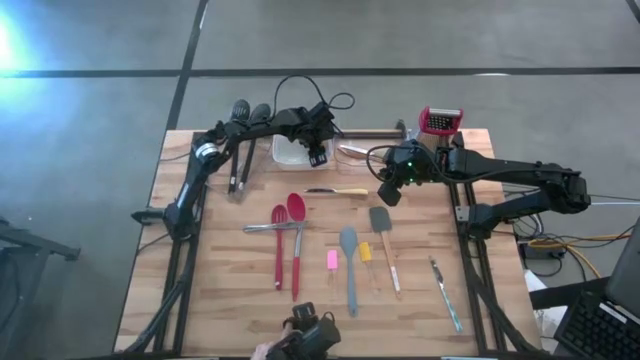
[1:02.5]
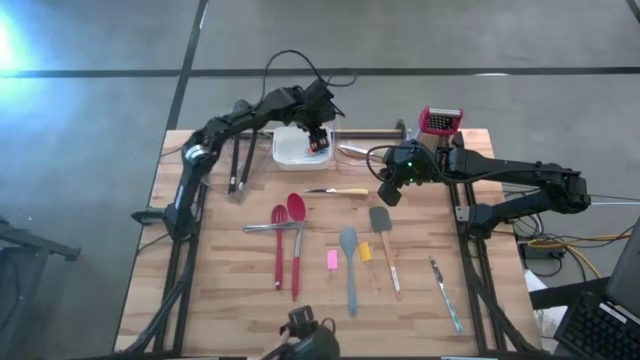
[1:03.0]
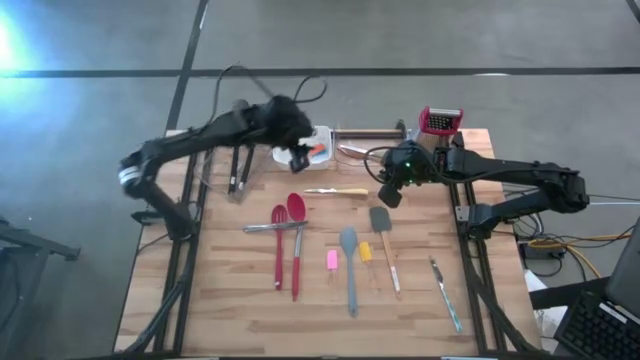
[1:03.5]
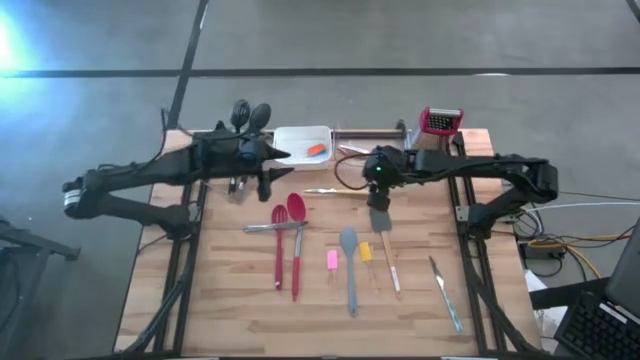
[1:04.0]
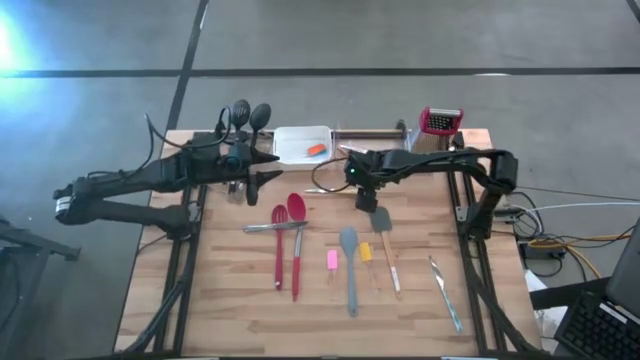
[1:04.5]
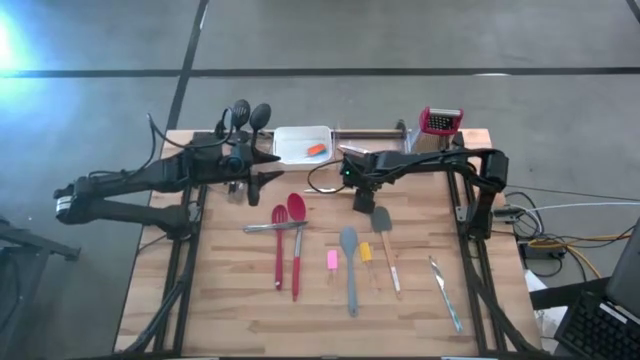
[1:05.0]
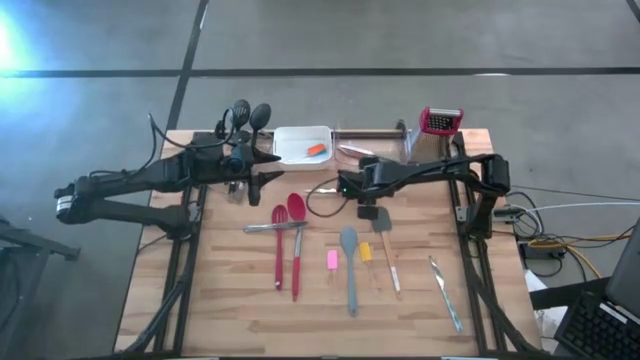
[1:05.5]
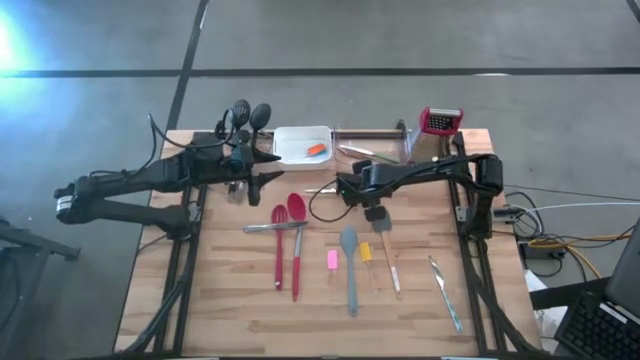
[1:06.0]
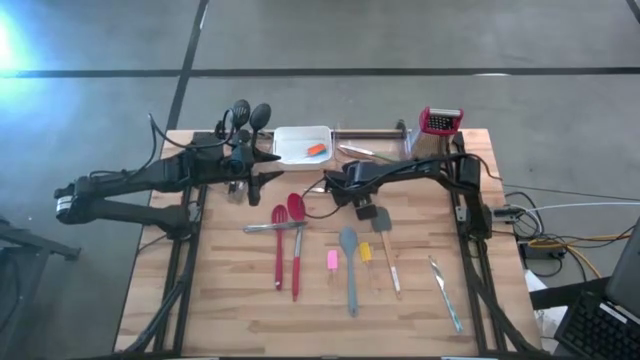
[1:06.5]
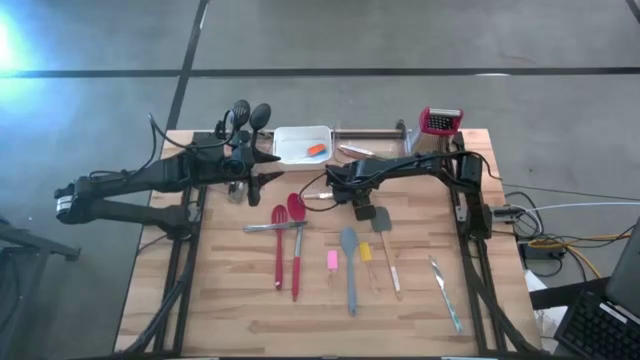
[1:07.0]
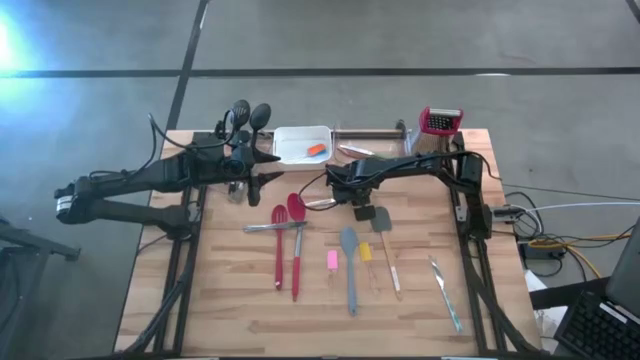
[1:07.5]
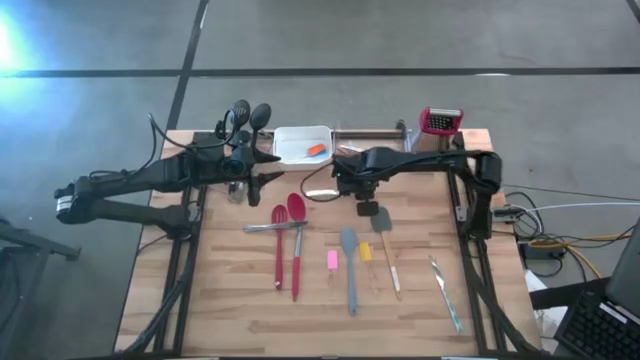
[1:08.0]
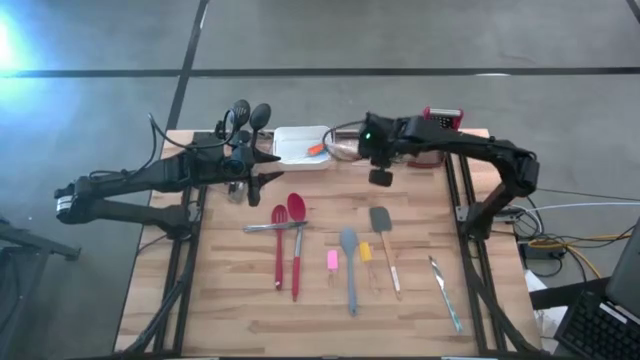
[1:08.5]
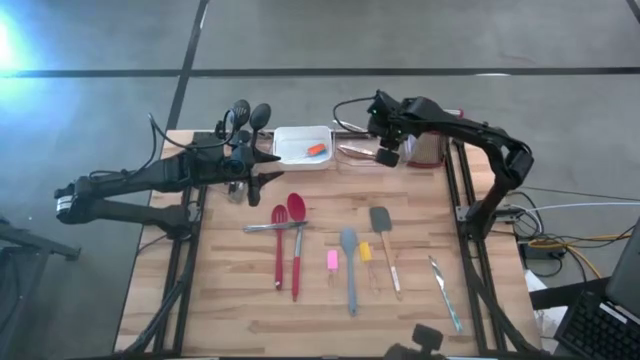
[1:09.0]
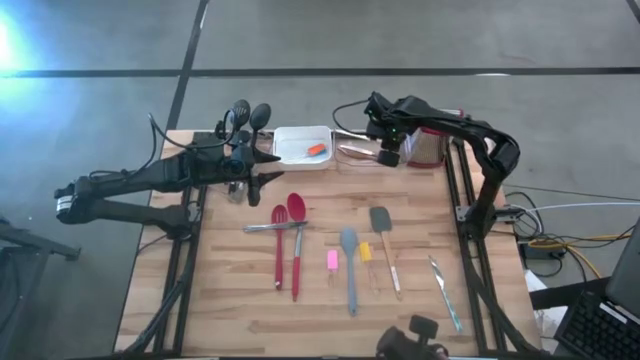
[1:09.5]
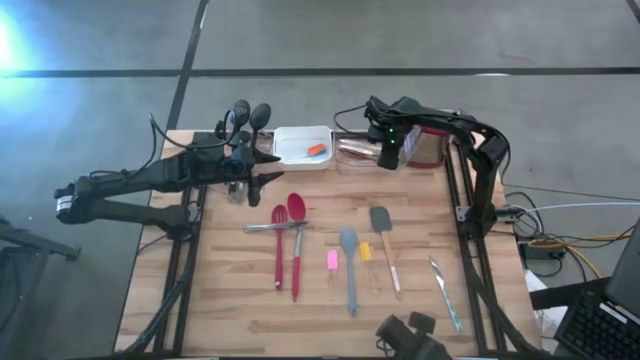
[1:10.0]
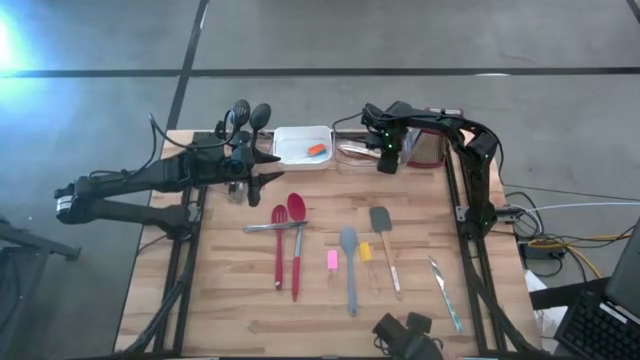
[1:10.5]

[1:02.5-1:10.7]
Task: Pick & Place Kitchen Items
Put the yellow table knife into the right transparent bin

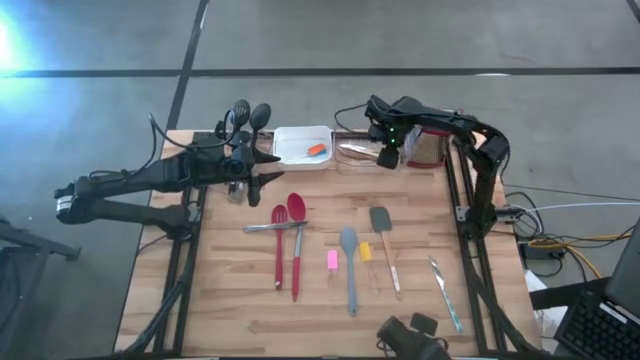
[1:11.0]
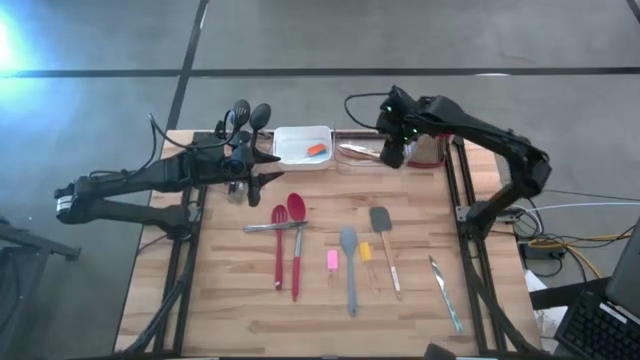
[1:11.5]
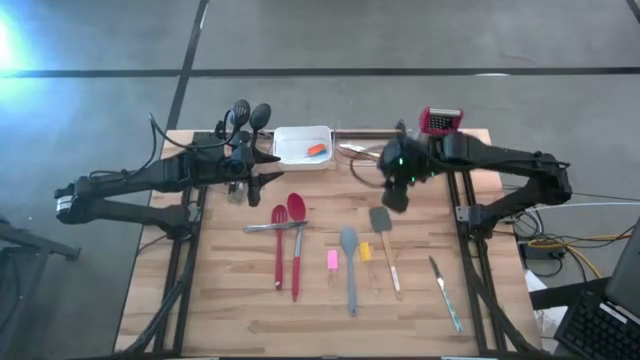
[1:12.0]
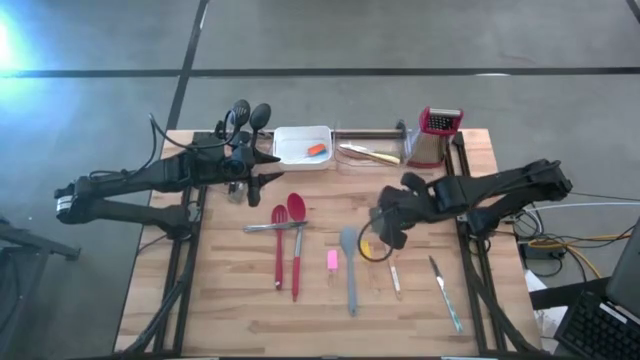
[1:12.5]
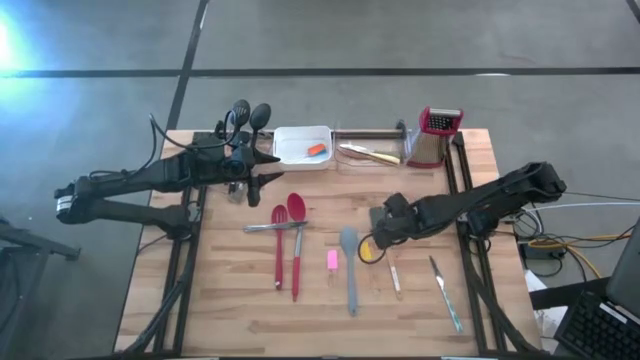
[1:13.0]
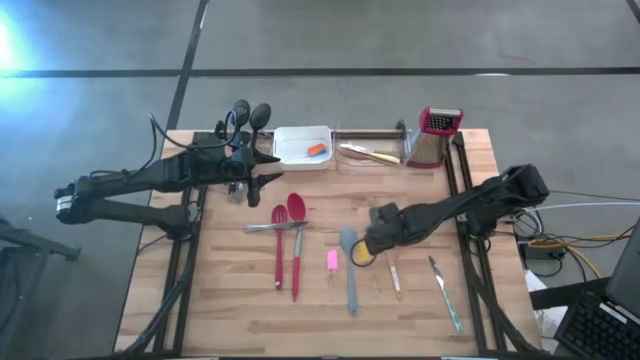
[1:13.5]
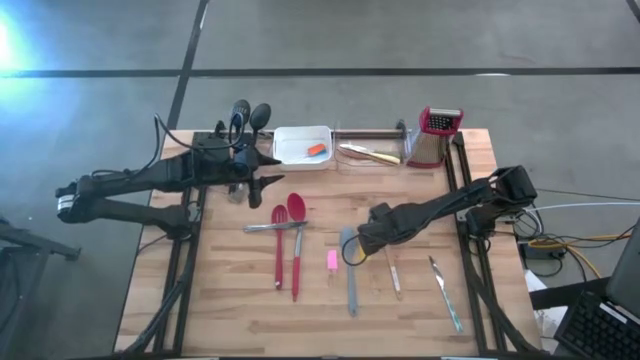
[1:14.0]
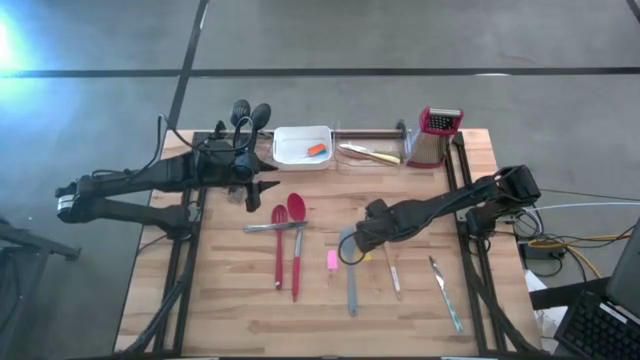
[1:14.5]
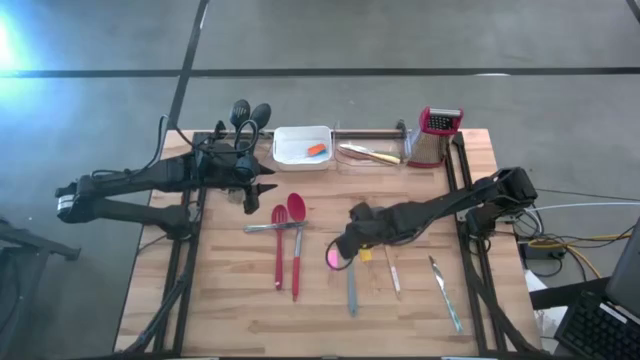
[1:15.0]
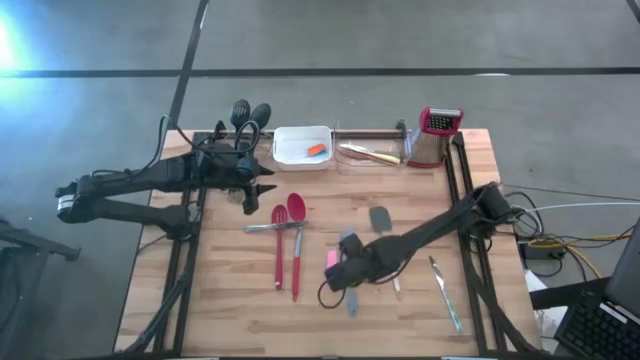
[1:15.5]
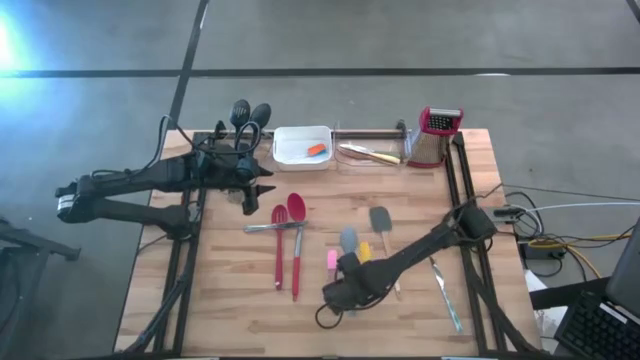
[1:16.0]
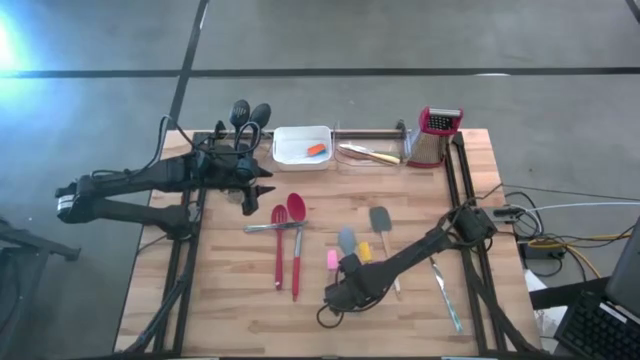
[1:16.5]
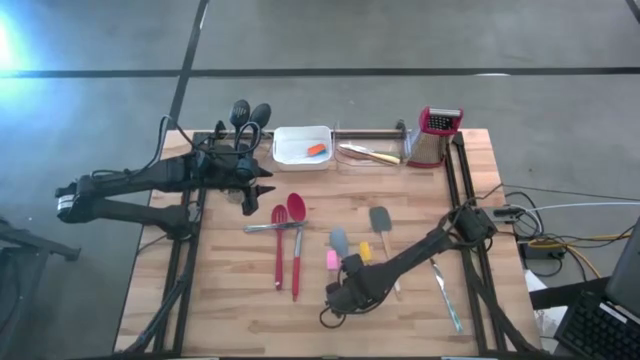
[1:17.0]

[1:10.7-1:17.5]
Put the gray serving spoon into the left transparent bin

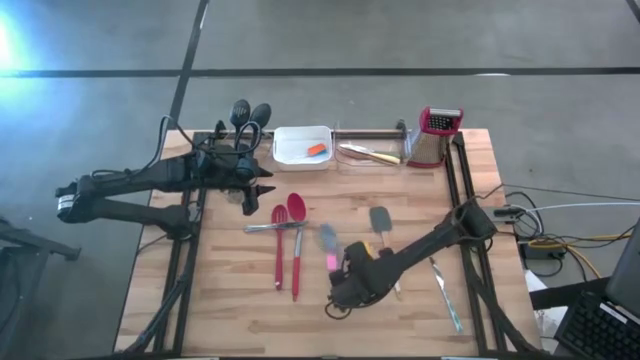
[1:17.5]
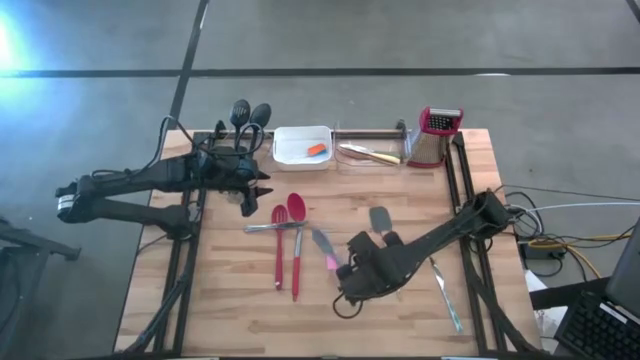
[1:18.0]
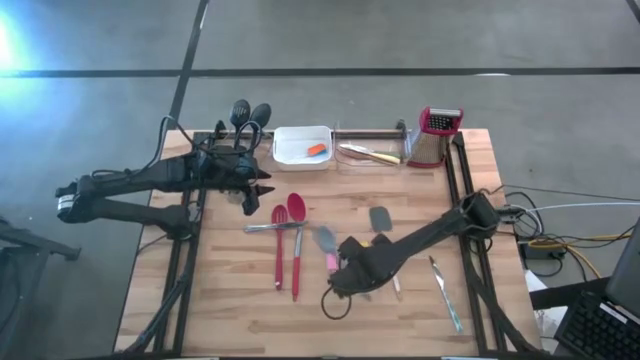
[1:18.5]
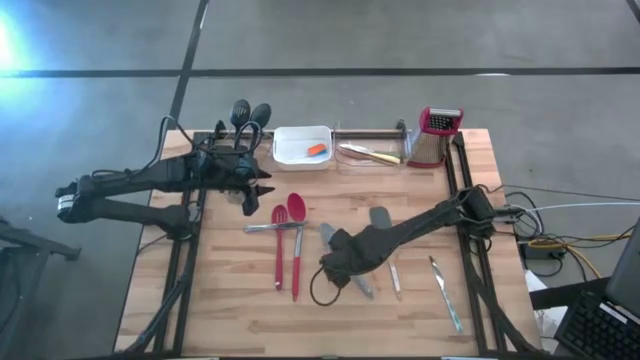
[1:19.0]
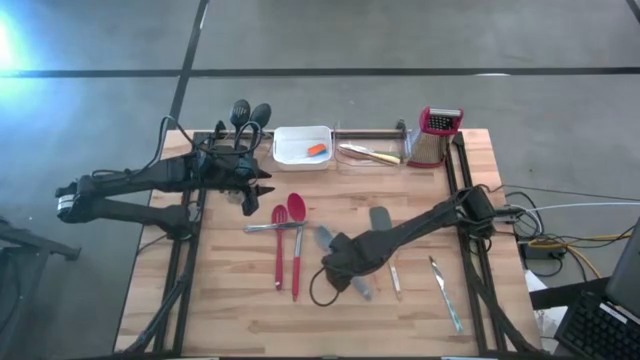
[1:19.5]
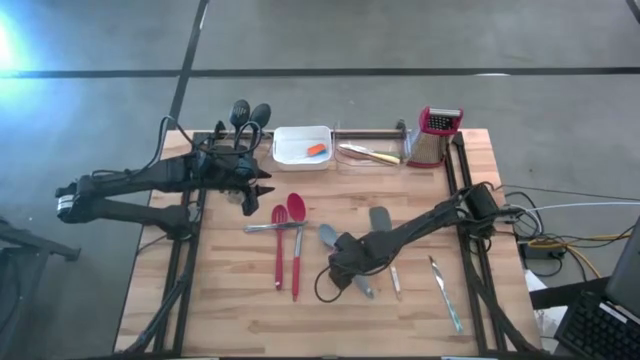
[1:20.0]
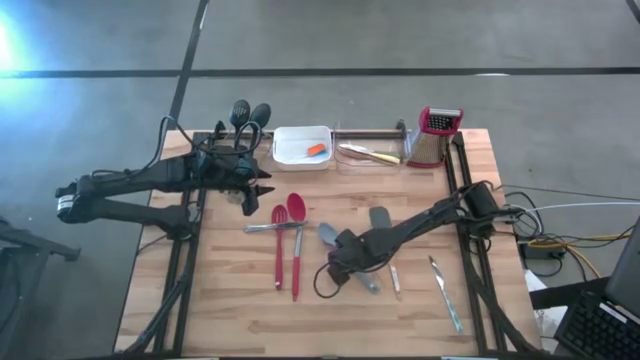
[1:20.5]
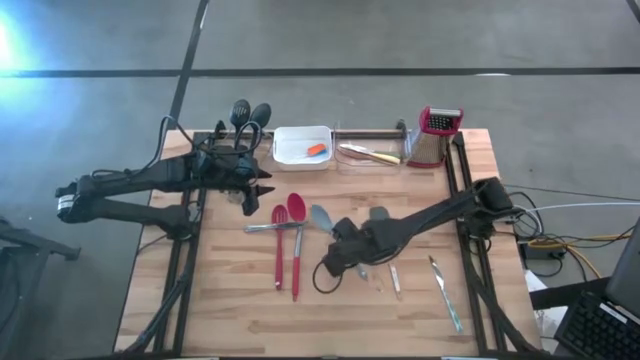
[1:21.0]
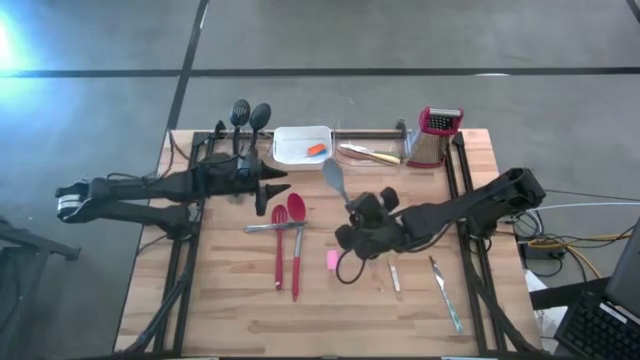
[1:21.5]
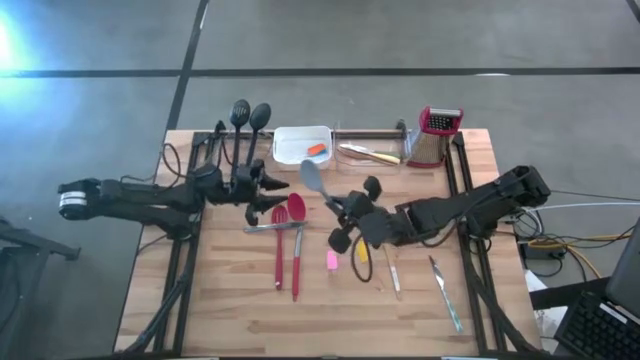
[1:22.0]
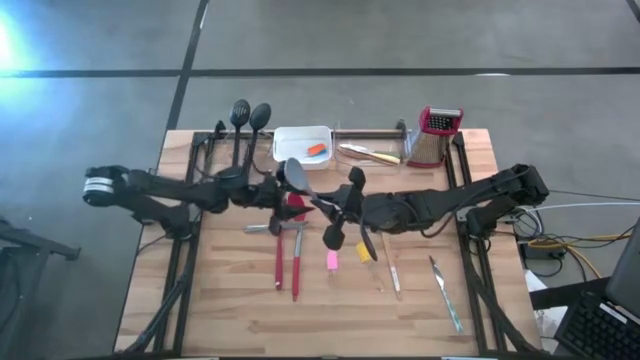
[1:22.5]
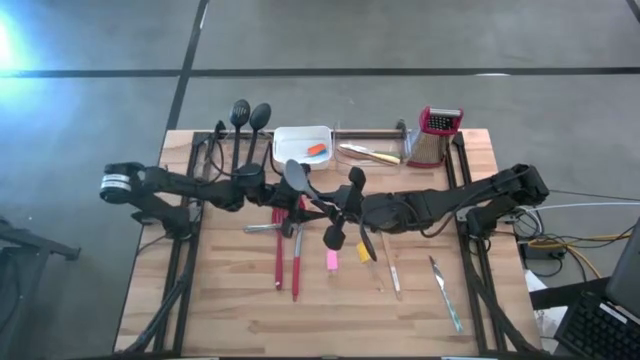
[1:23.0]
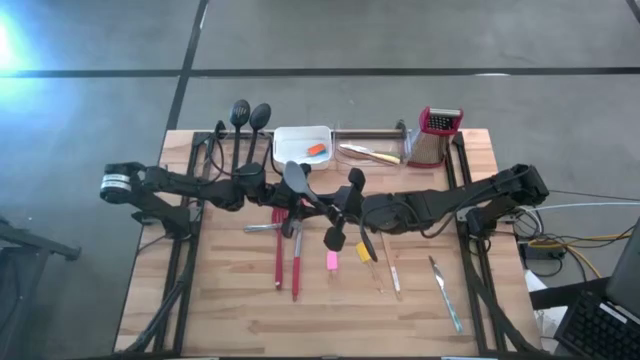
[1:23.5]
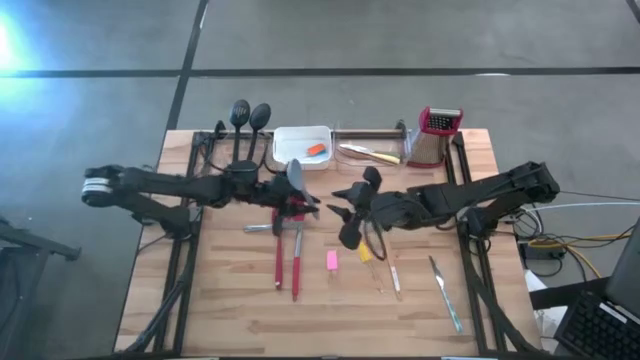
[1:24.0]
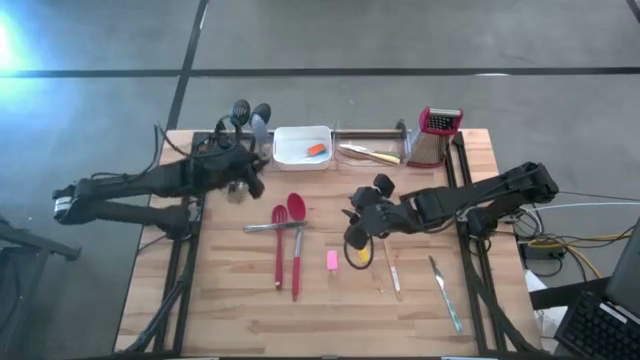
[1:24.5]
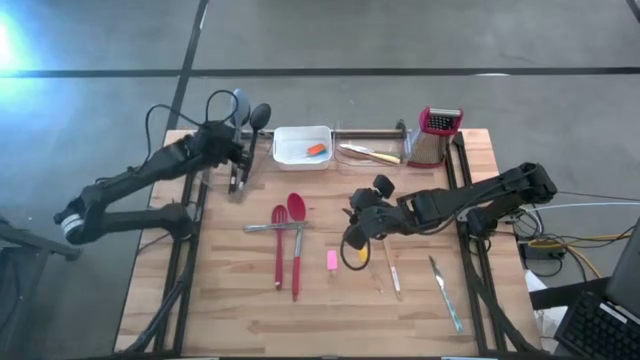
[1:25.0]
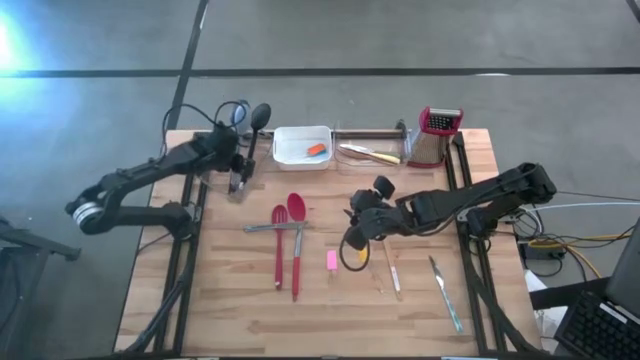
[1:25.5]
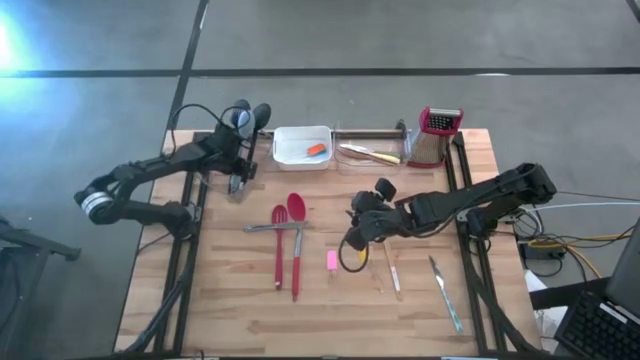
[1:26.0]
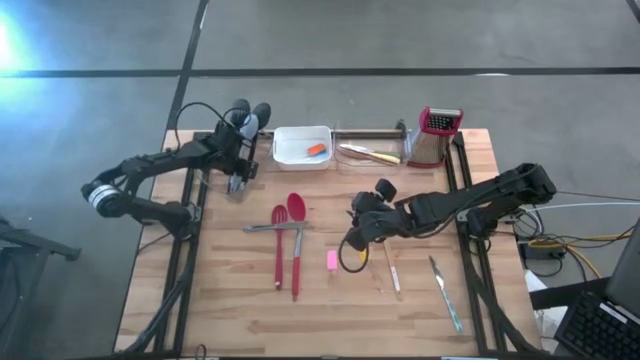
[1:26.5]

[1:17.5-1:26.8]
Put the gray serving spoon into the left transparent bin
